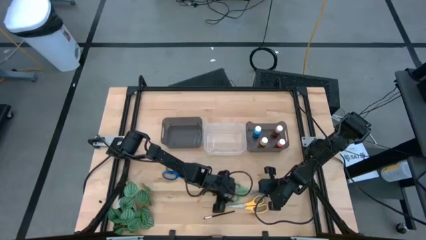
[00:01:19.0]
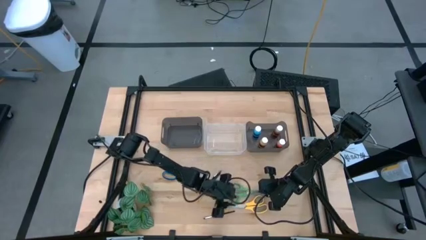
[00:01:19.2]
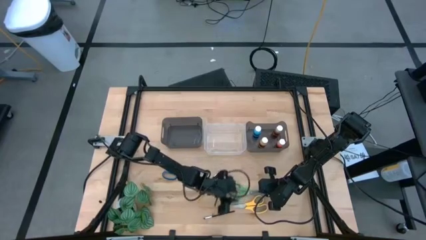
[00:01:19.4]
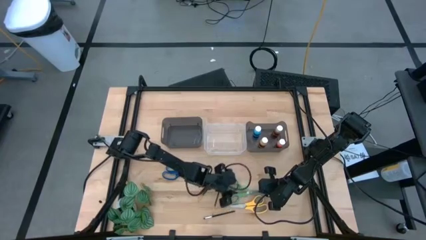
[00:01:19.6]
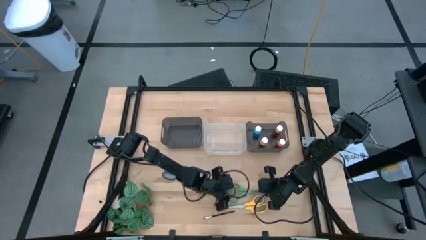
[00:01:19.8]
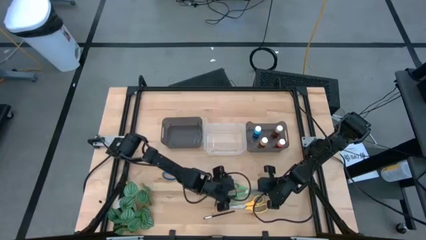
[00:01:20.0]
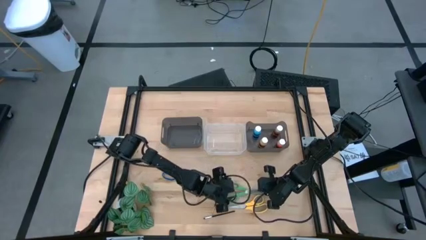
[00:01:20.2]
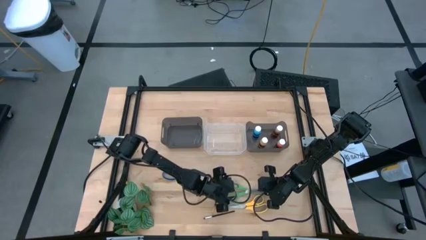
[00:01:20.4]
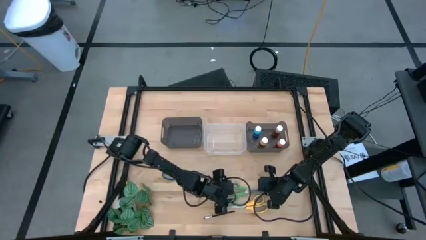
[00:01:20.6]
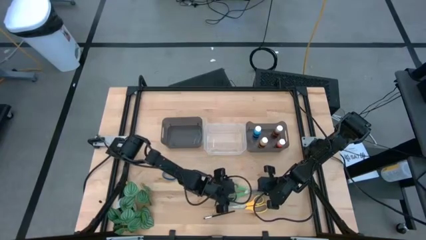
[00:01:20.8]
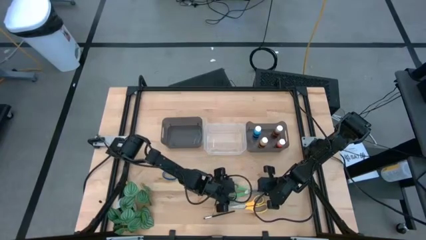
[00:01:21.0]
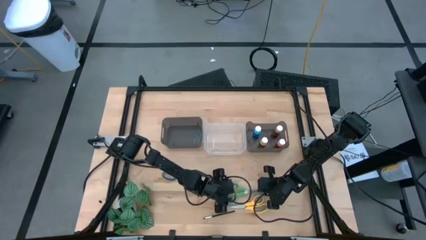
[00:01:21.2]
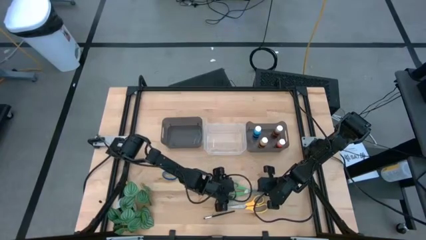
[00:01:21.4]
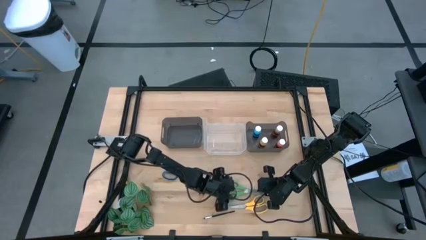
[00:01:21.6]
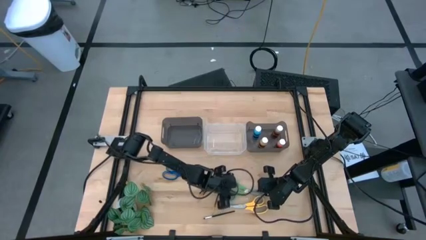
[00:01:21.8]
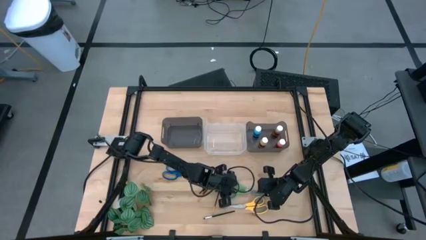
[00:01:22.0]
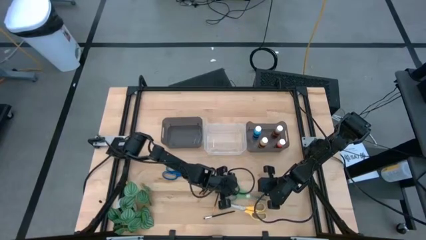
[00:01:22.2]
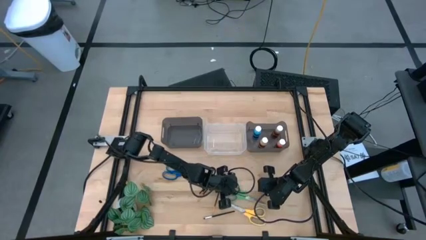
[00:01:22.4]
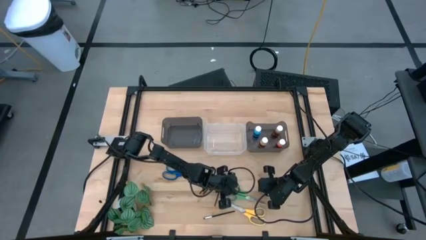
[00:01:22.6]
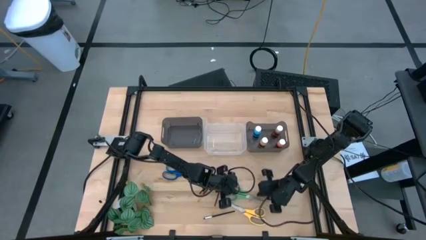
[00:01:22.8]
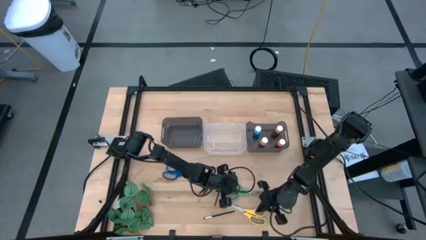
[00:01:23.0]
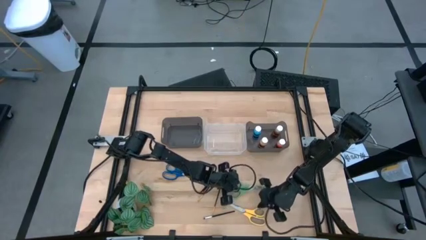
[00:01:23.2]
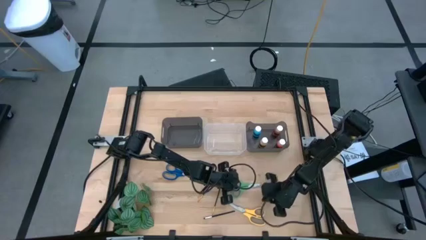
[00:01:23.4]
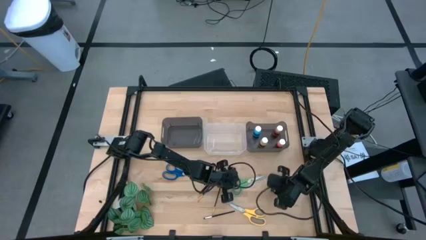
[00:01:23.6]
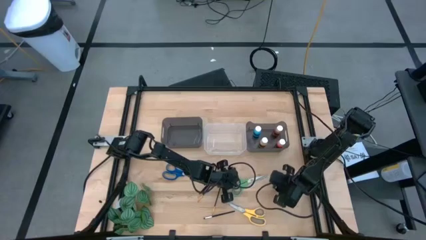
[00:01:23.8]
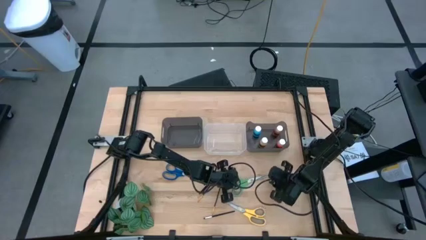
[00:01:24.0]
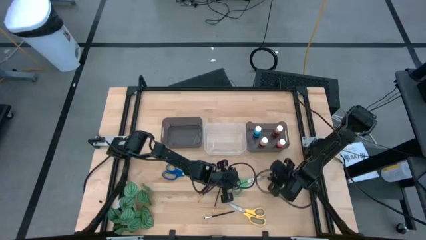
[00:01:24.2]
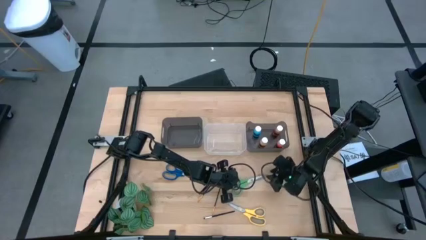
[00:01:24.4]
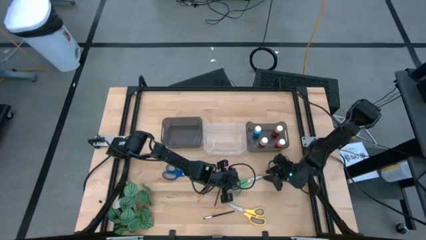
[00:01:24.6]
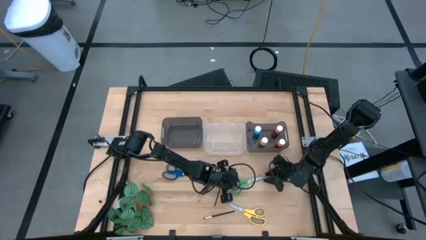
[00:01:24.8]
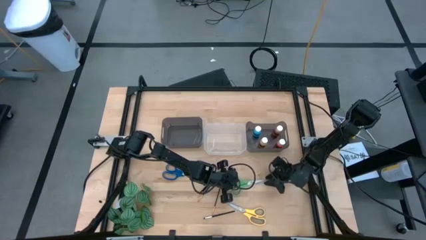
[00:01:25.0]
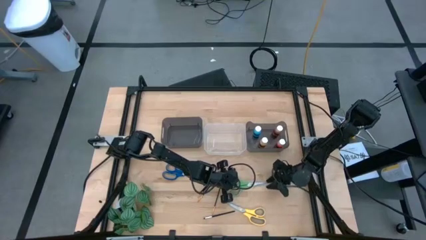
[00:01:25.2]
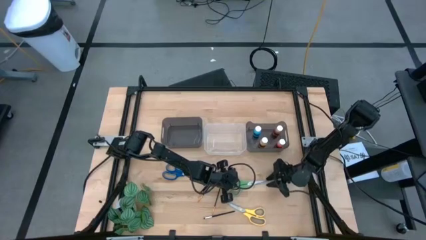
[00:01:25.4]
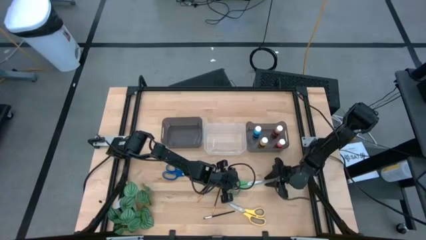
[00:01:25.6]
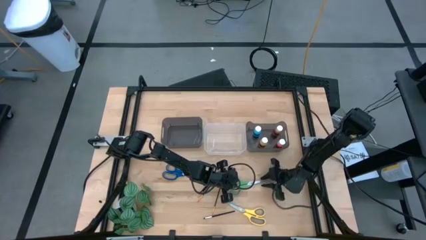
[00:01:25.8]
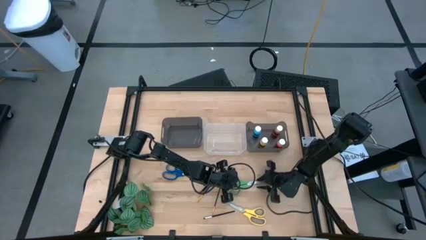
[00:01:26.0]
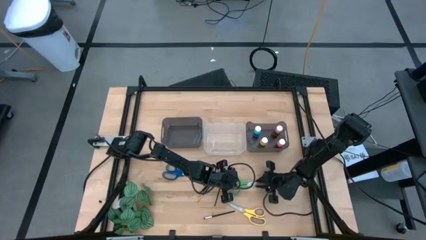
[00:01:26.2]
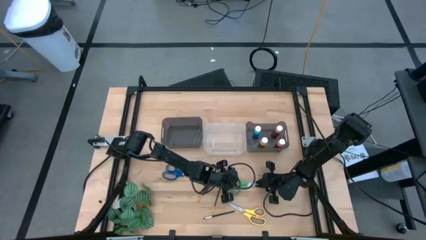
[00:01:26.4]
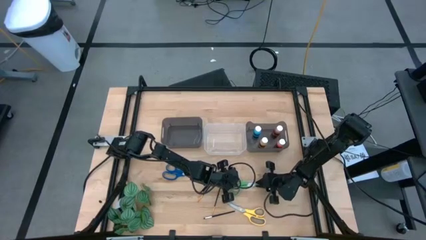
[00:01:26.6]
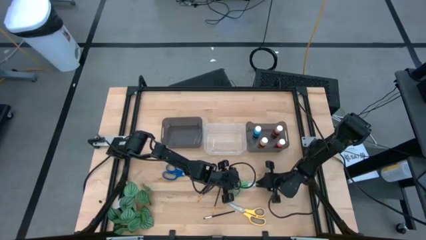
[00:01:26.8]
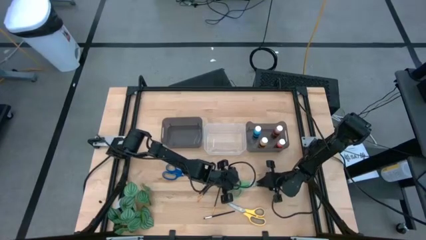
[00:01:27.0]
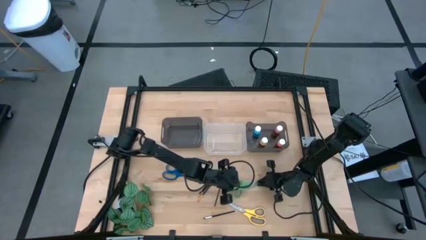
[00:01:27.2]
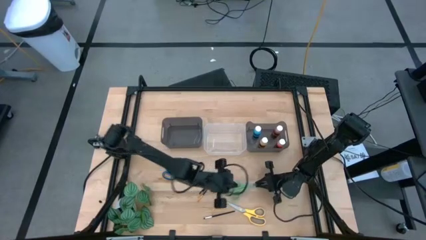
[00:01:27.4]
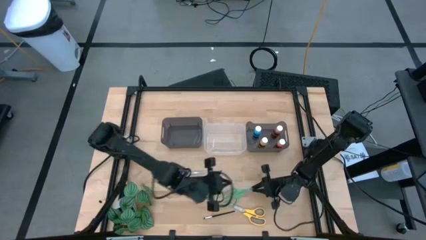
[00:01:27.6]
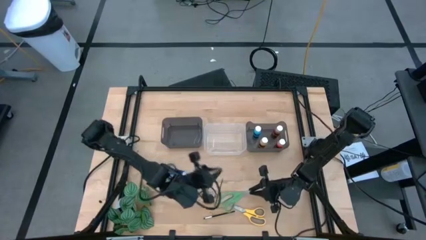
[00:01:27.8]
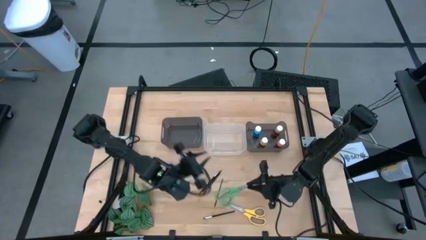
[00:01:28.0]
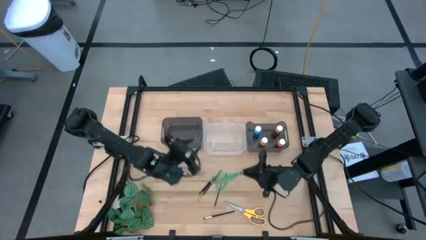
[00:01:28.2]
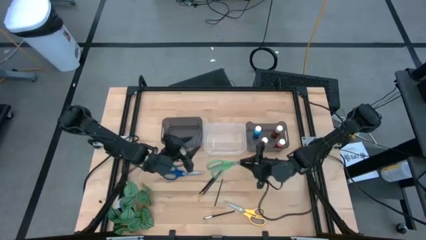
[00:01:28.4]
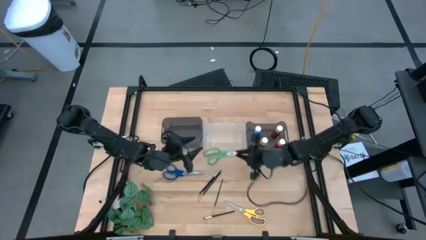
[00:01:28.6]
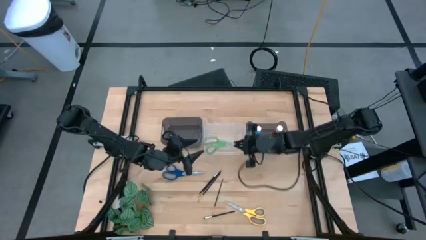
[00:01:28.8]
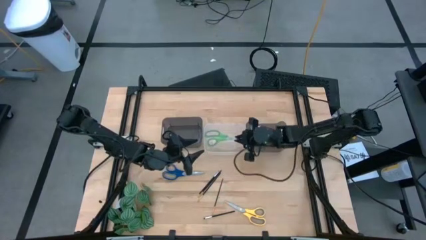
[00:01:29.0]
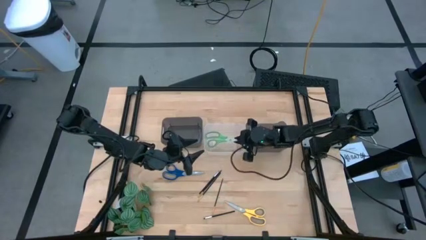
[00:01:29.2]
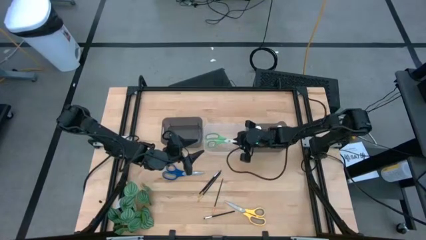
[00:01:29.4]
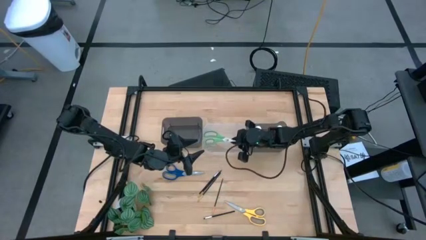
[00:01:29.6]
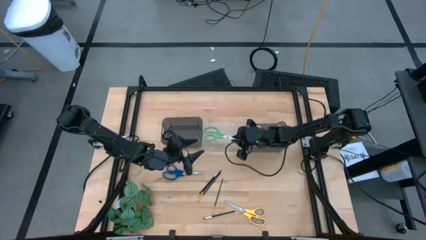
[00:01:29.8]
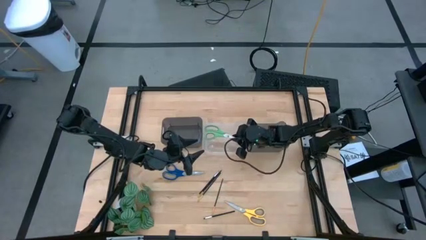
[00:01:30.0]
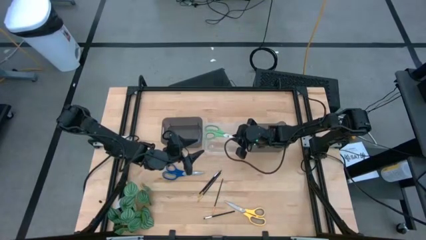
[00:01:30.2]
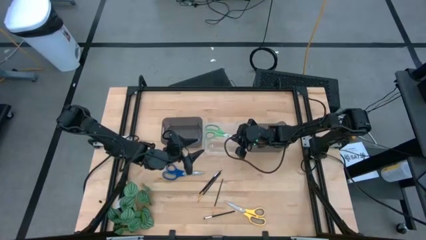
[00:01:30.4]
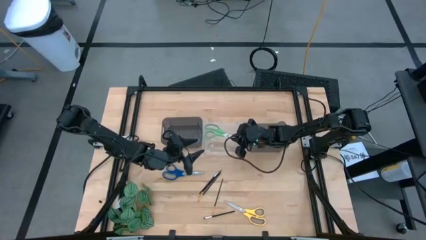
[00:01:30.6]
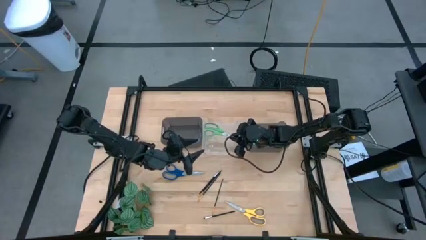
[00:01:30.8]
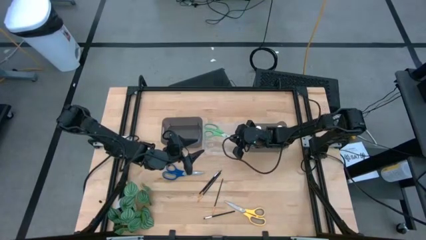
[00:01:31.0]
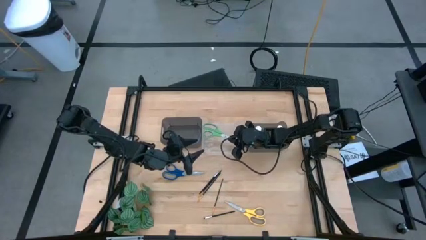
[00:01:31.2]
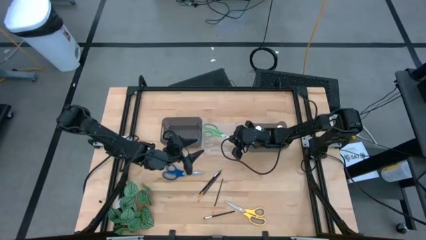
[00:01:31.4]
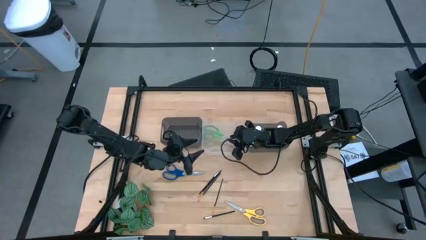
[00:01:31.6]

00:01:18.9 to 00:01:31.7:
Task: Pick & Place Paint Supplies
Put the green scissors into the transparent bin

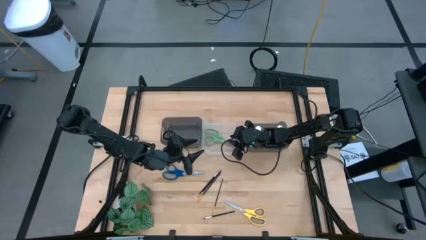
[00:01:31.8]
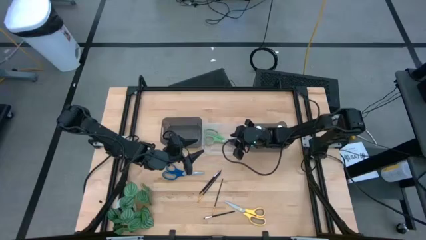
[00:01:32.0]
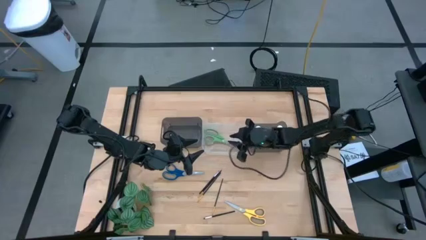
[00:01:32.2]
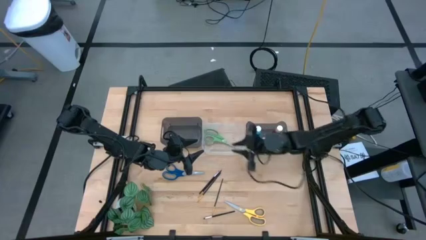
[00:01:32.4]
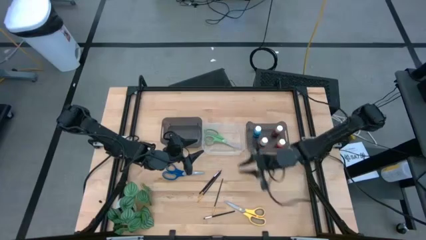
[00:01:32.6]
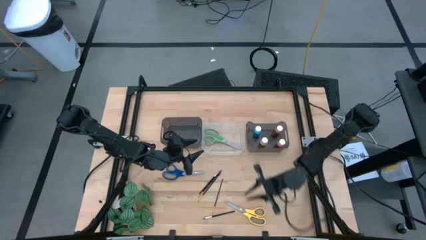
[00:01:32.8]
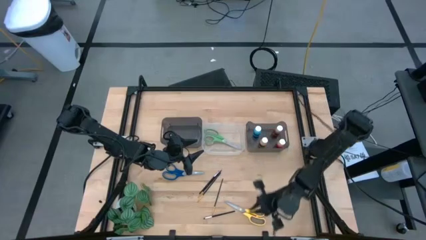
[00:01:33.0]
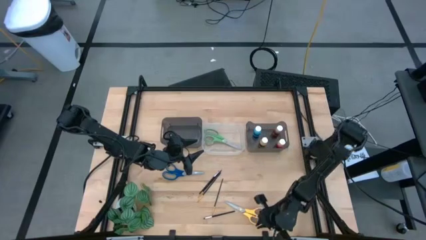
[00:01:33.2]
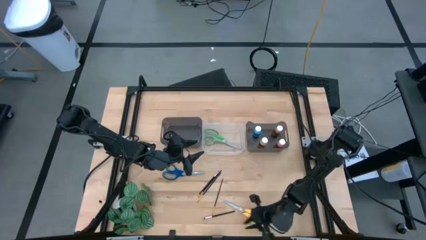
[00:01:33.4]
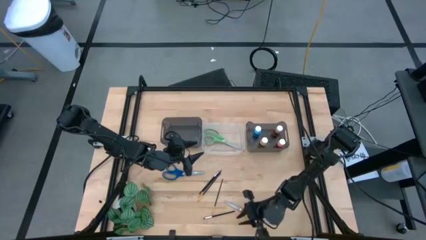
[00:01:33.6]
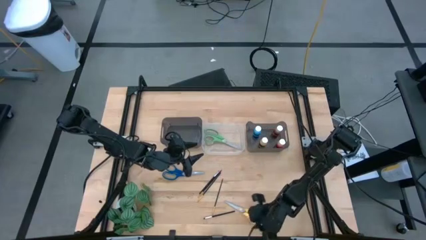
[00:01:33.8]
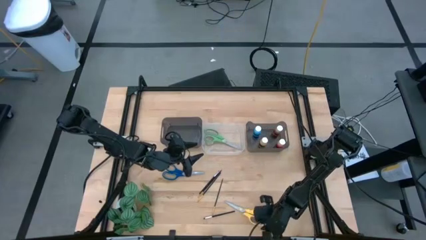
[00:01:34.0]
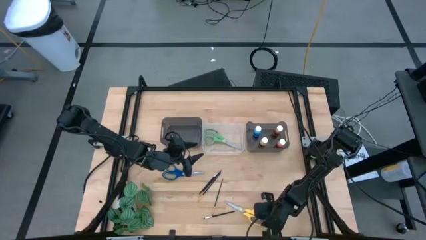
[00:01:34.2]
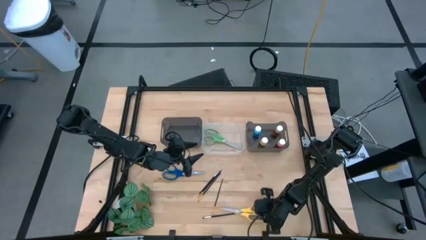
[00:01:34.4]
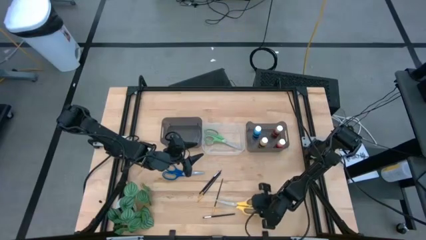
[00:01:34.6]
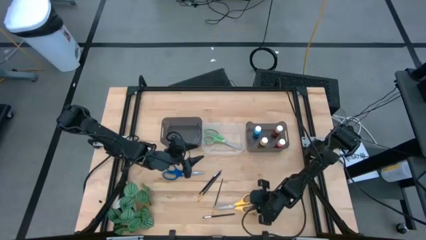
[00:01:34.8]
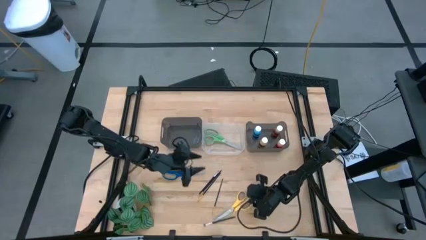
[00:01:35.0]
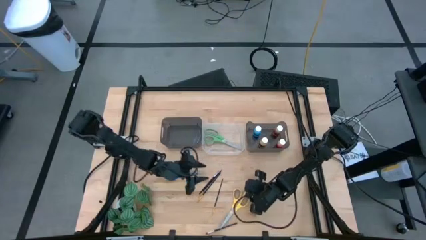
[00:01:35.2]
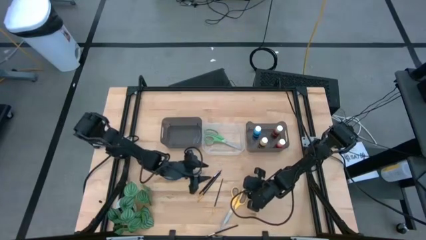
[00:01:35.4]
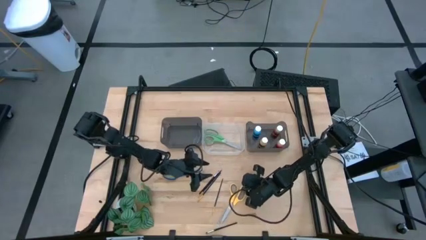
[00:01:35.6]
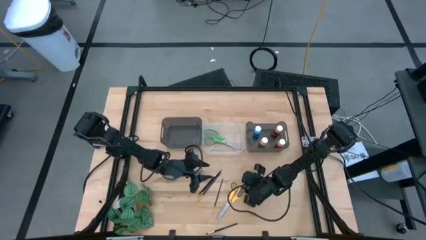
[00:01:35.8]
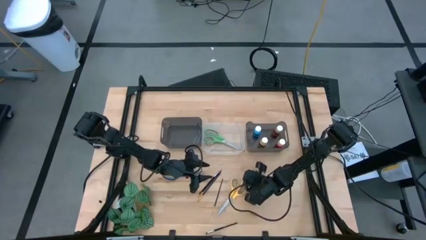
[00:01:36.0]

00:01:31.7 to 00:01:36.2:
Move the yellow scissors to the center of the table
